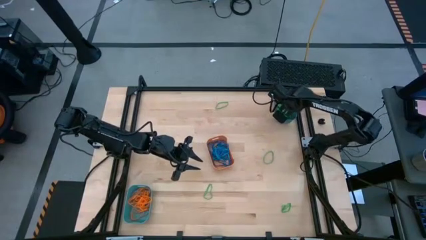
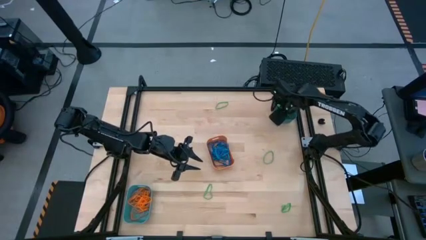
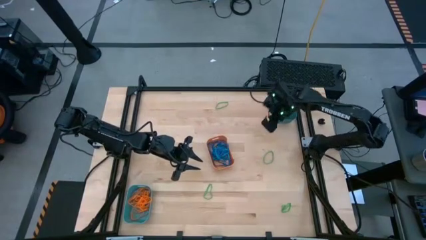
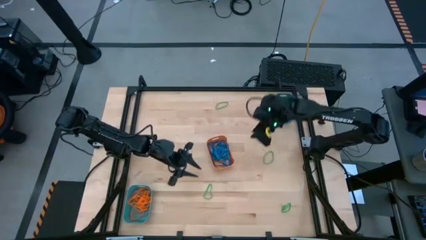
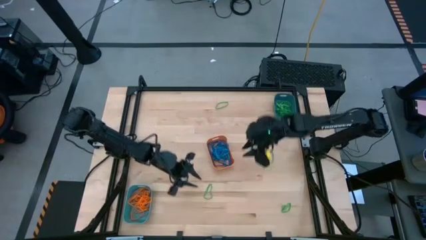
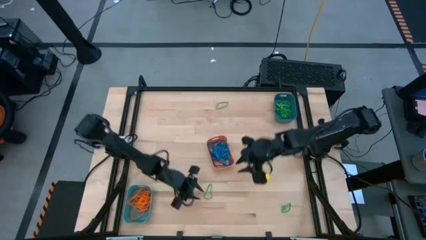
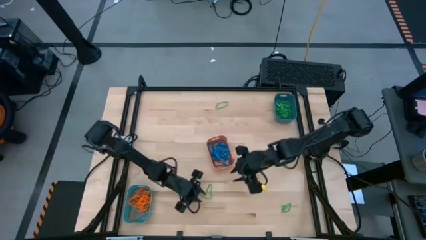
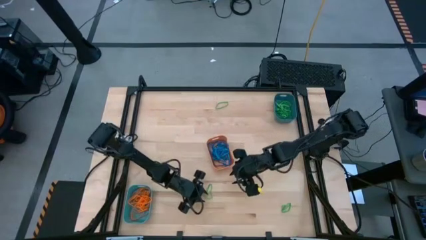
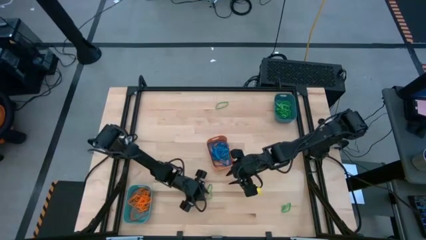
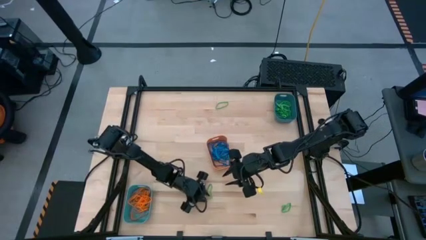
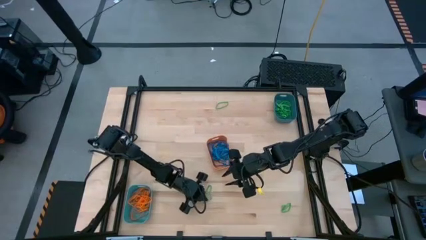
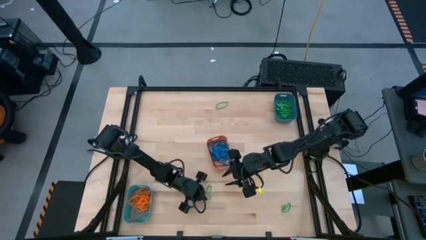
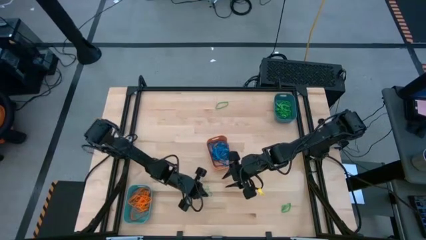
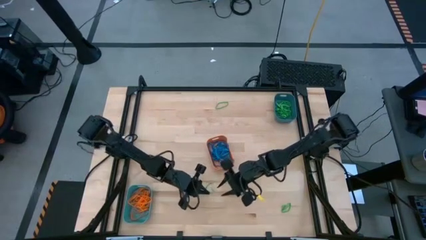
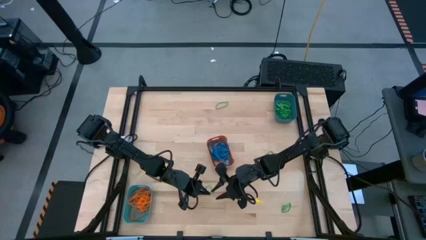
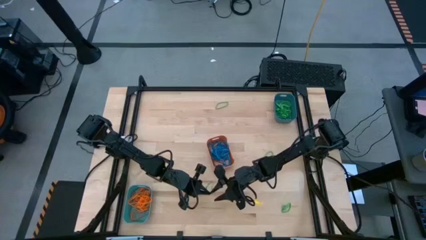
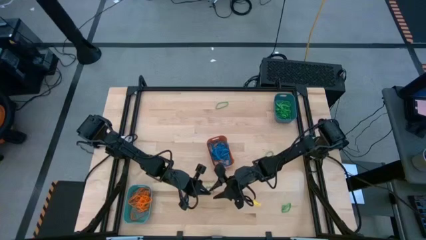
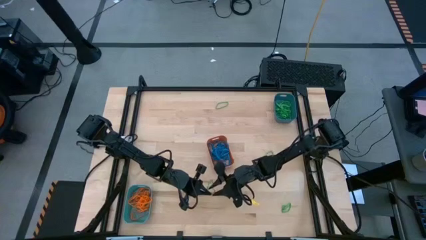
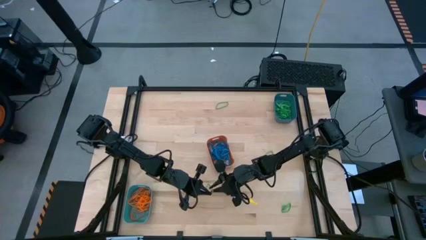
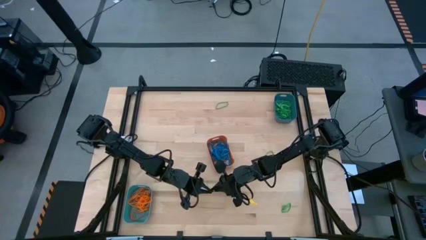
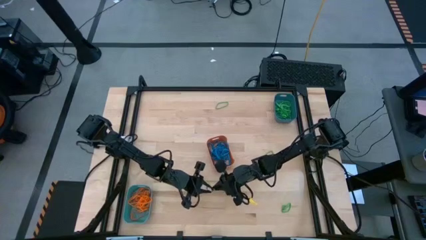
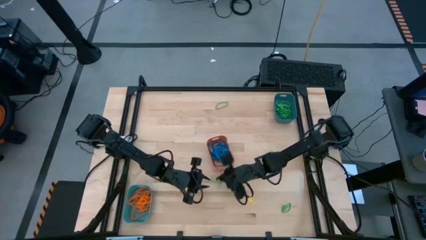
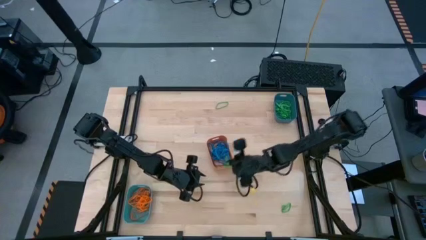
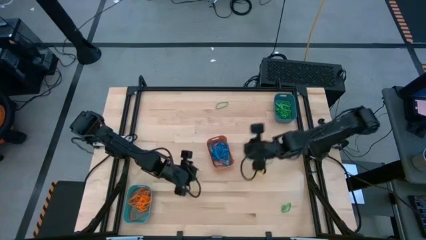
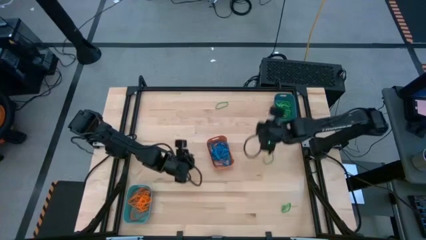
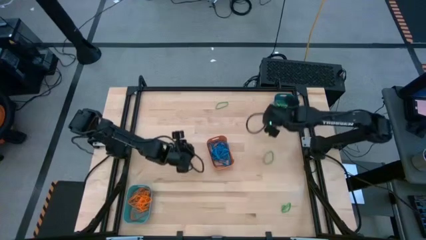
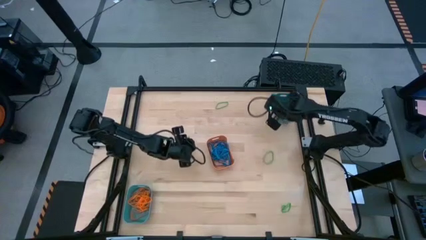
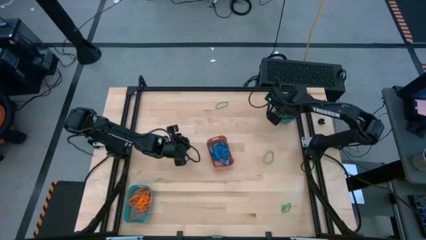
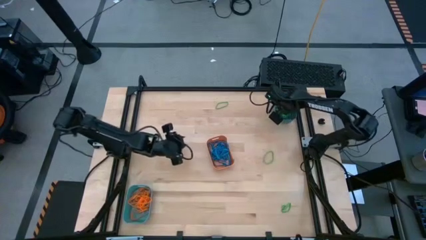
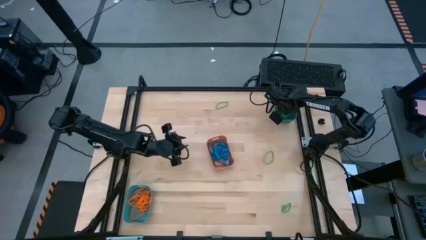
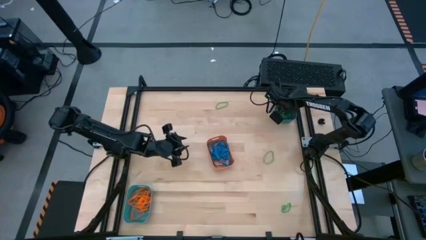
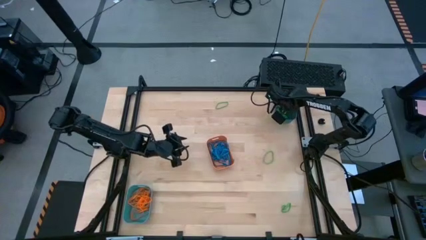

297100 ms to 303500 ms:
Task: Sort rubber bands into baskets
Put the green rubber band into the blue bin

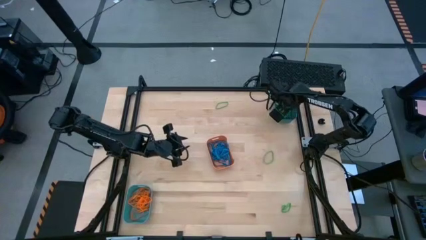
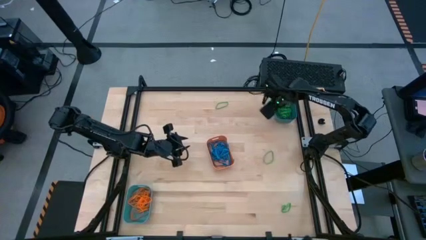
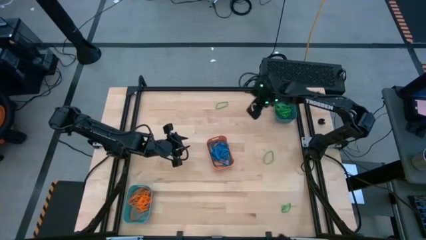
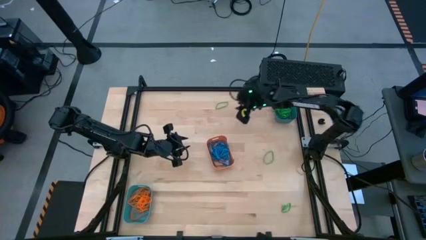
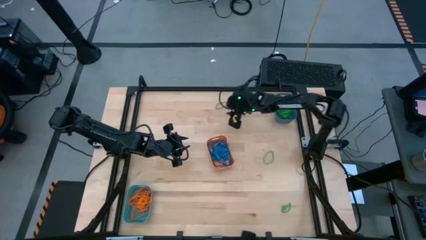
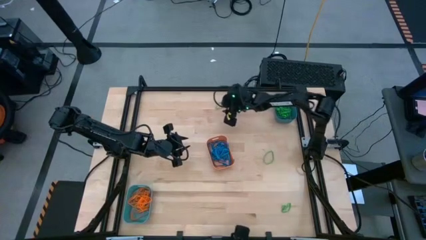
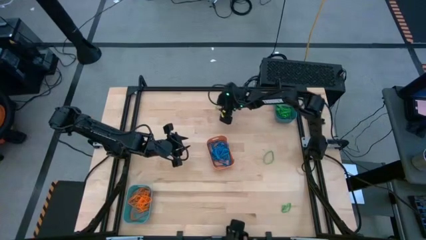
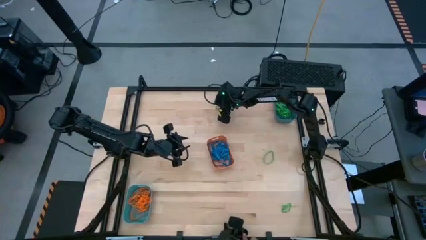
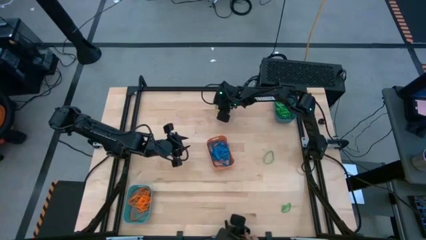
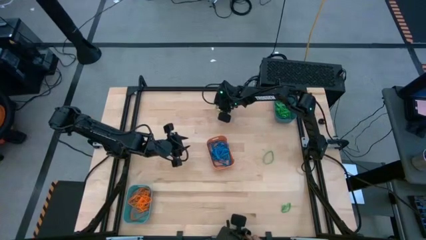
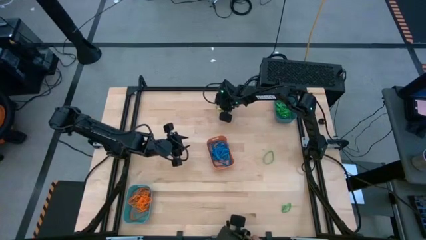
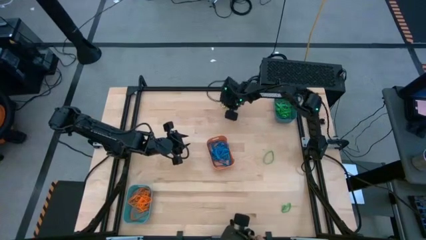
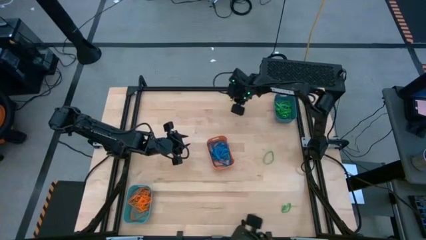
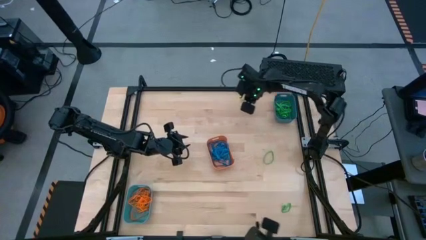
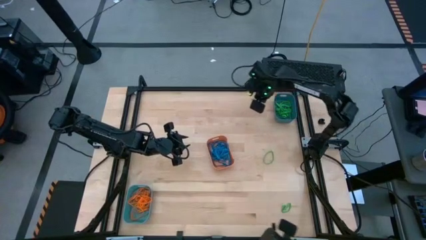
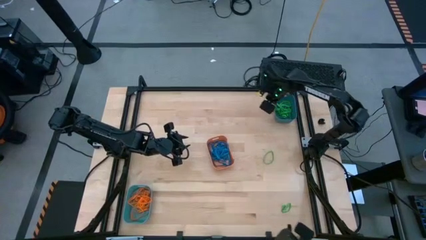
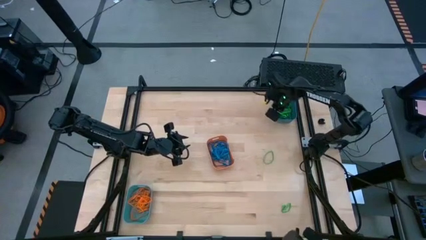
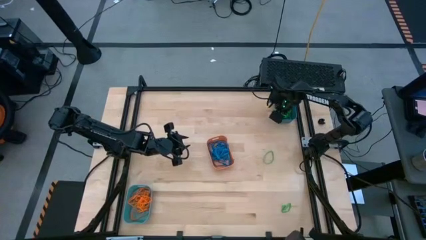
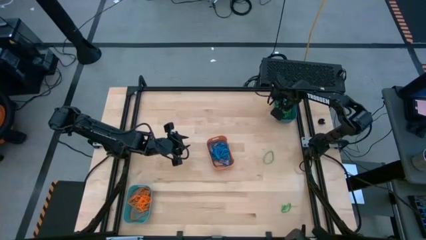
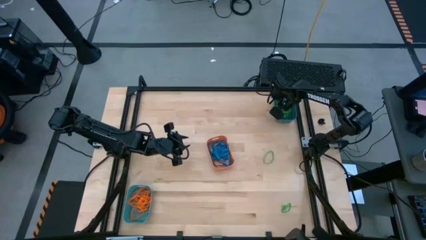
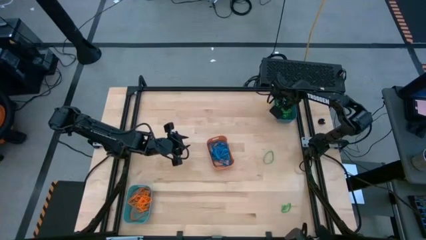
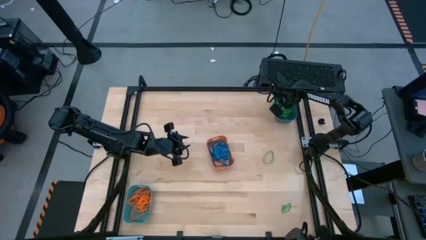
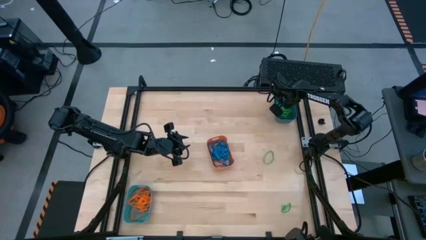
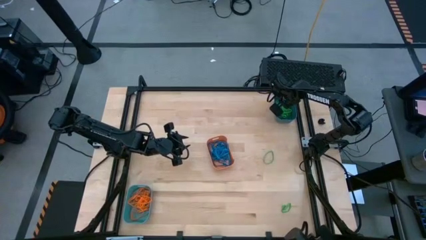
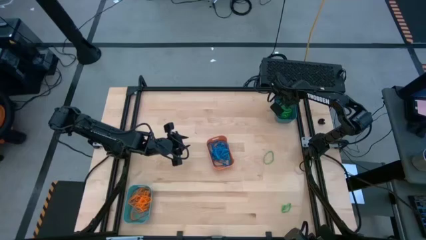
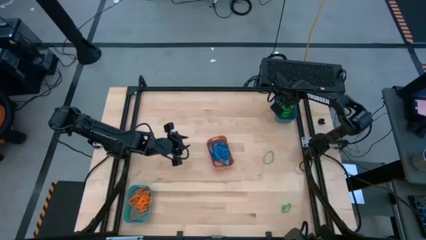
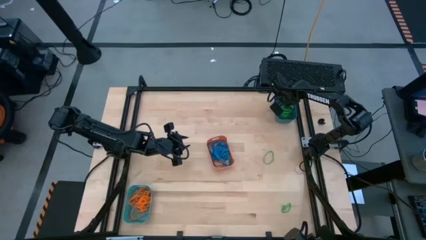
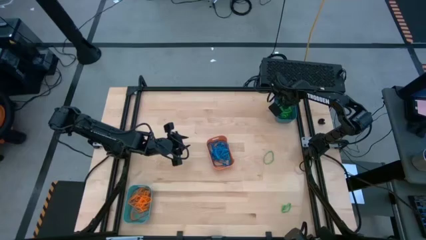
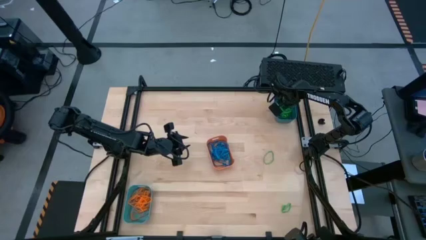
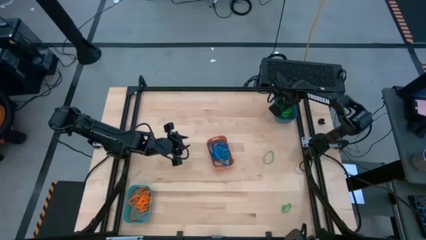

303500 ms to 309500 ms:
Put the green rubber band into the blue bin

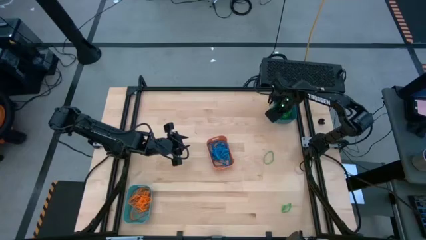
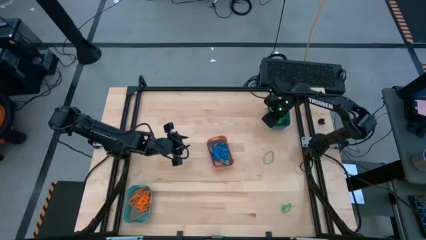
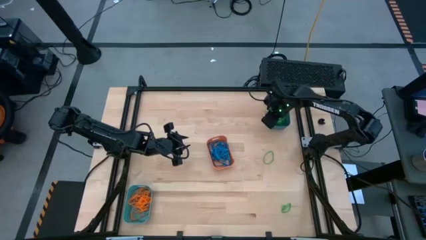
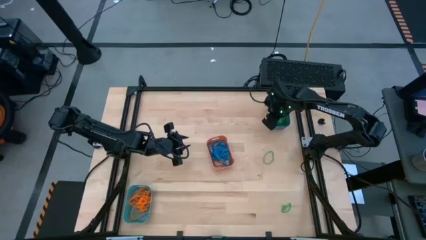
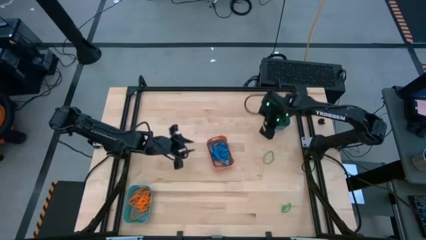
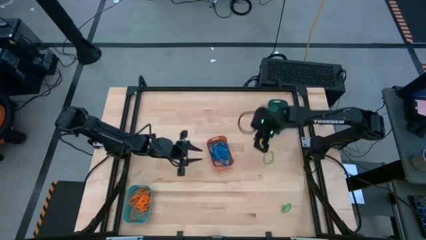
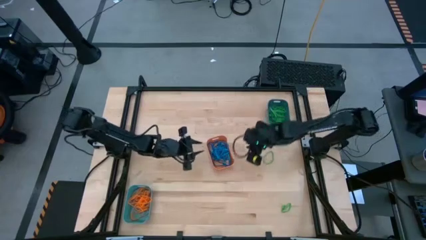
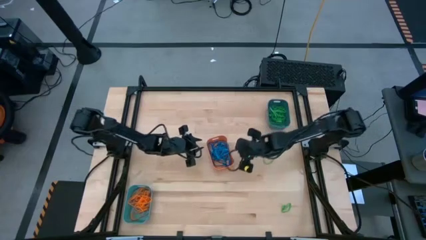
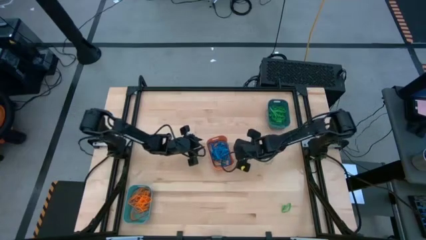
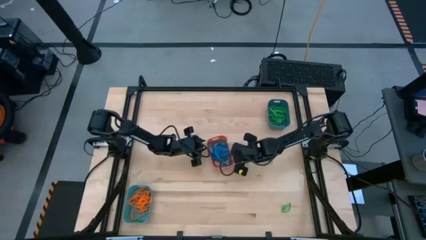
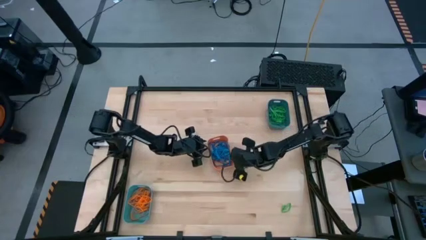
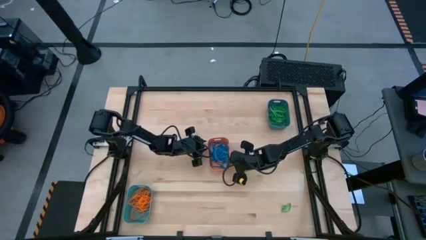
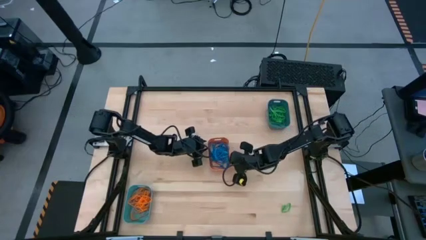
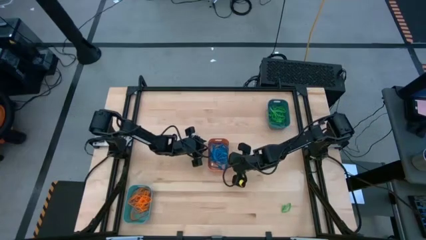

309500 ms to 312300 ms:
Adjust the orange bin on the middle of the table

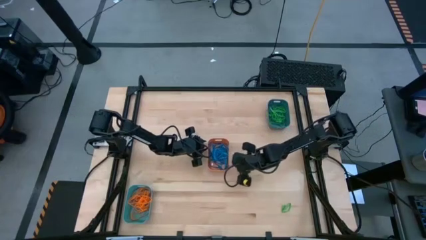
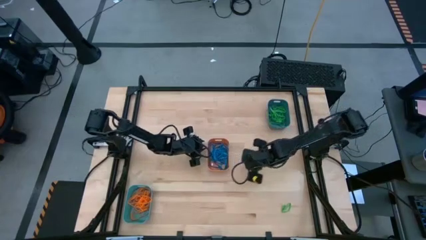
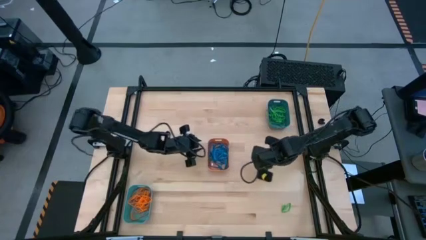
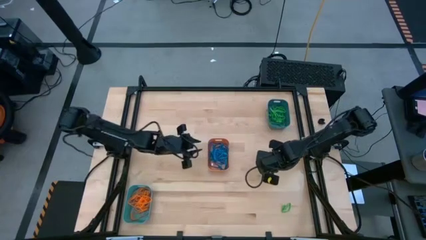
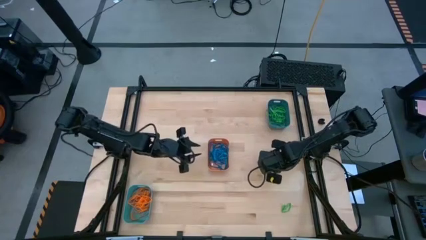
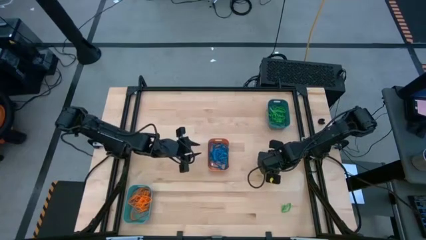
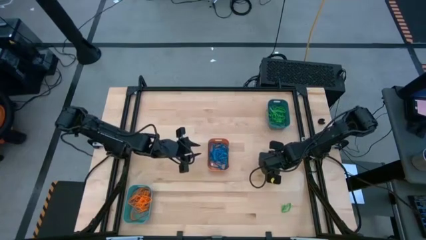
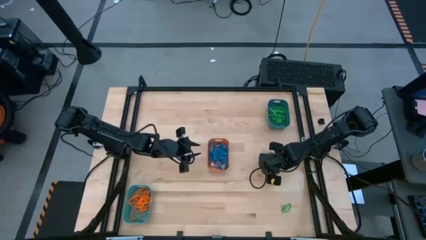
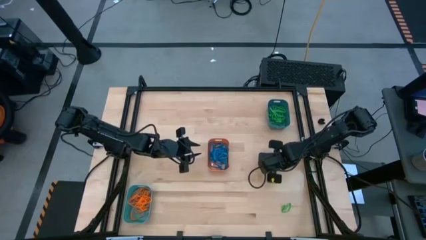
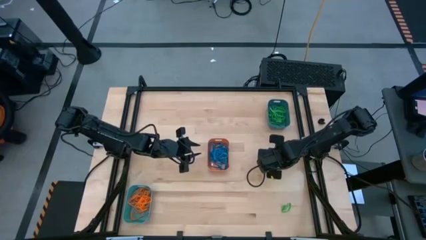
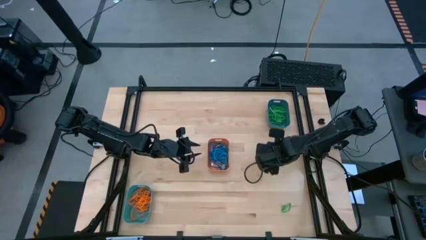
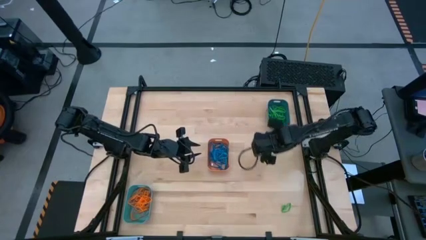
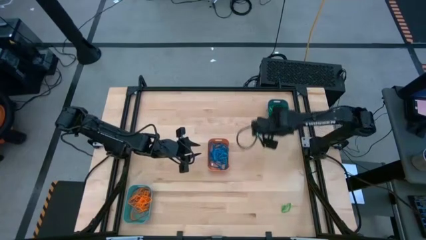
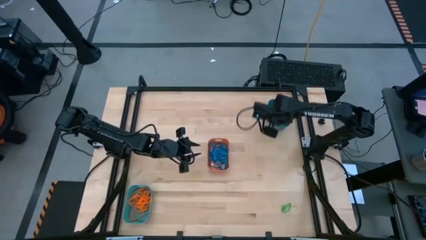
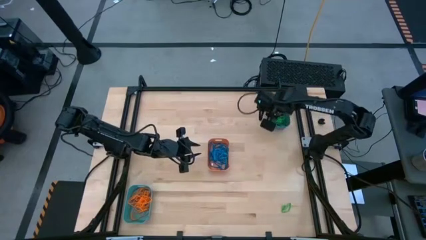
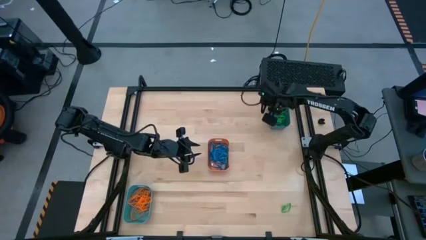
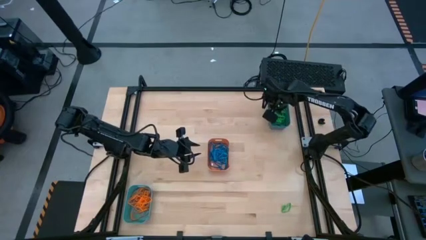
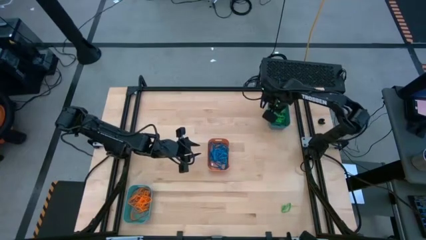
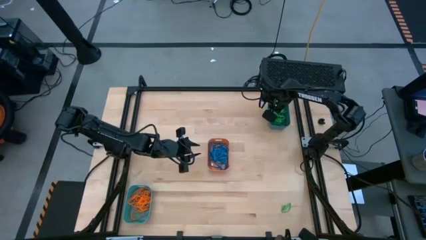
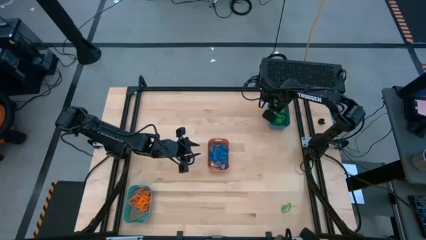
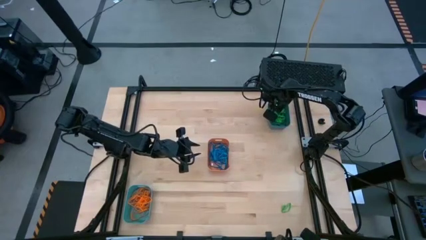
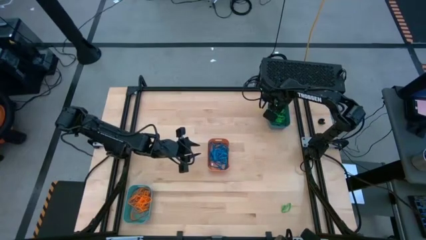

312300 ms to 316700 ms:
Put the green rubber band into the blue bin
